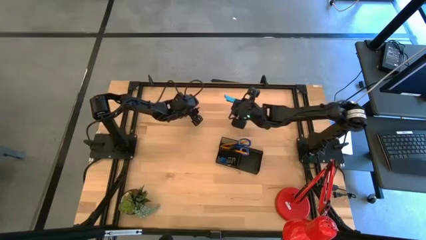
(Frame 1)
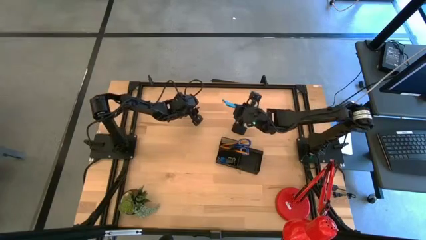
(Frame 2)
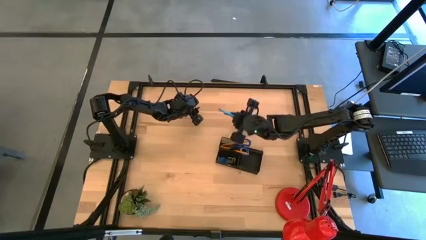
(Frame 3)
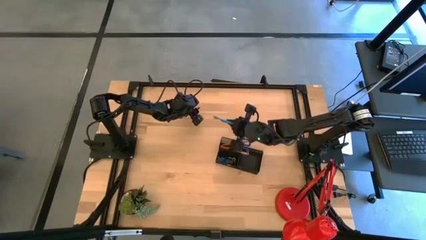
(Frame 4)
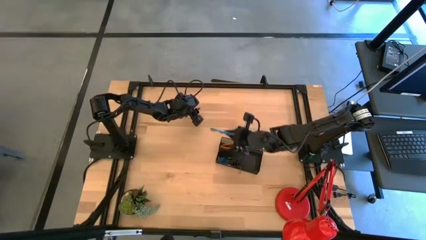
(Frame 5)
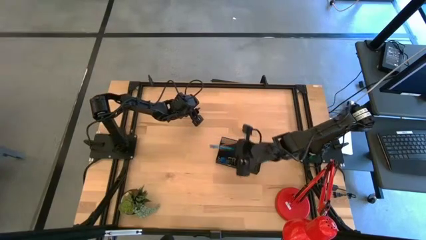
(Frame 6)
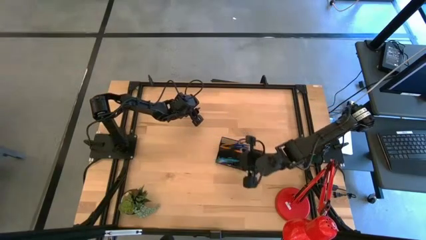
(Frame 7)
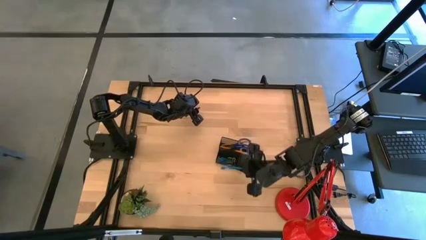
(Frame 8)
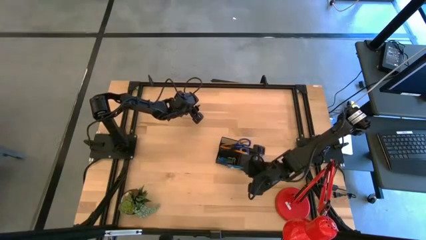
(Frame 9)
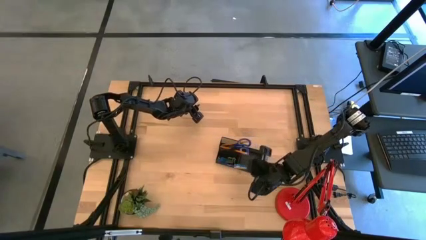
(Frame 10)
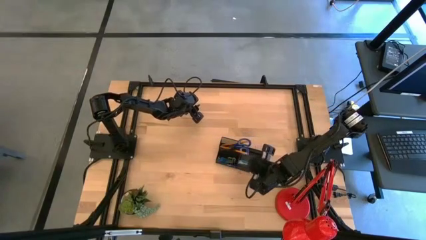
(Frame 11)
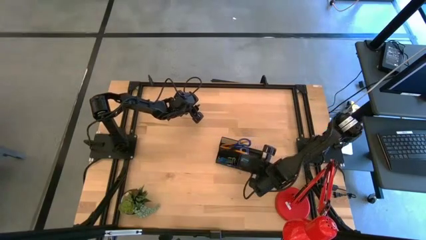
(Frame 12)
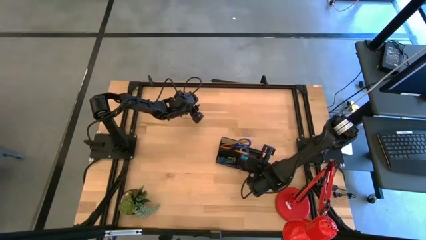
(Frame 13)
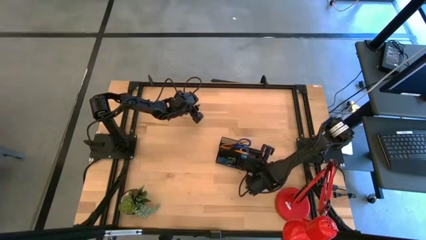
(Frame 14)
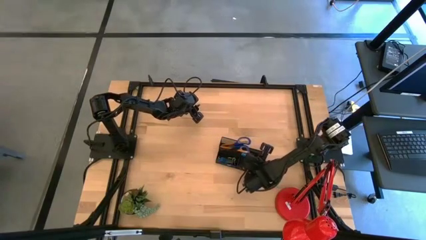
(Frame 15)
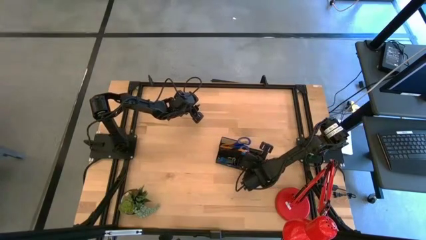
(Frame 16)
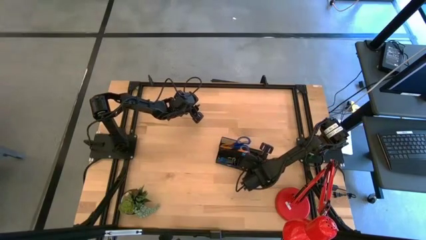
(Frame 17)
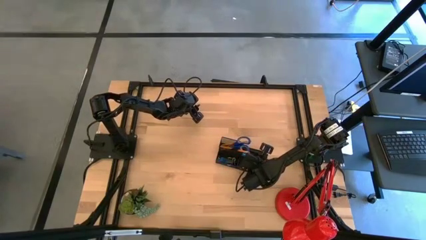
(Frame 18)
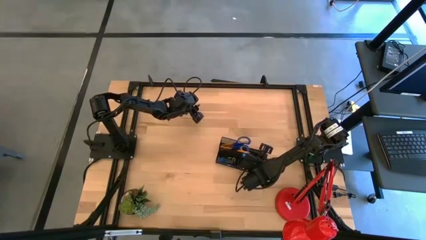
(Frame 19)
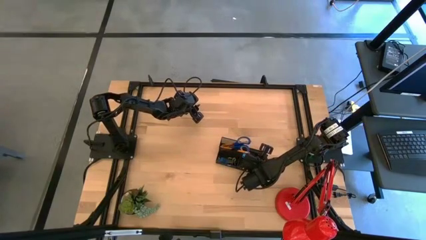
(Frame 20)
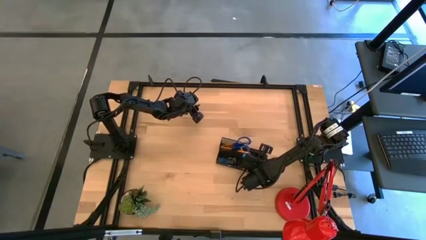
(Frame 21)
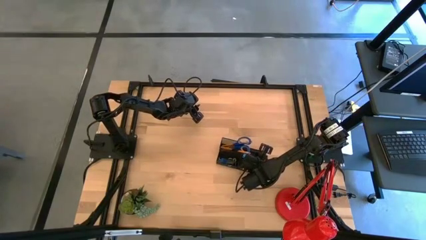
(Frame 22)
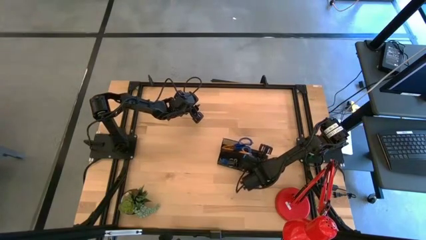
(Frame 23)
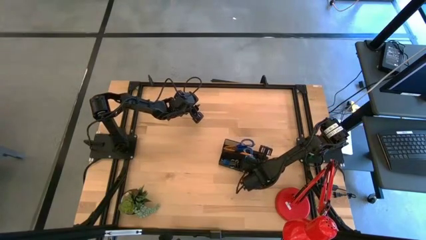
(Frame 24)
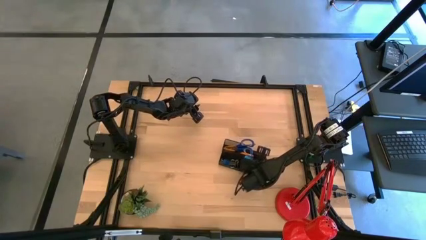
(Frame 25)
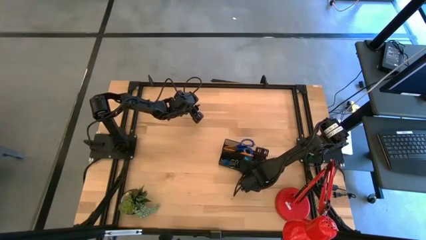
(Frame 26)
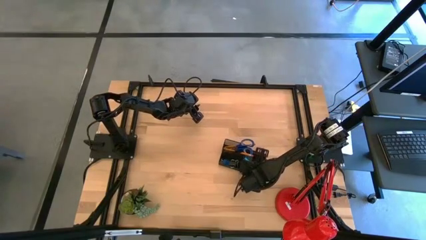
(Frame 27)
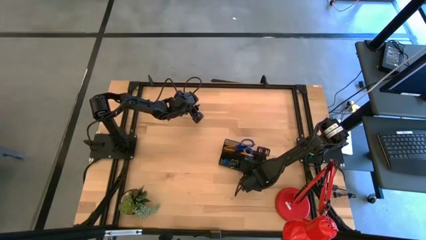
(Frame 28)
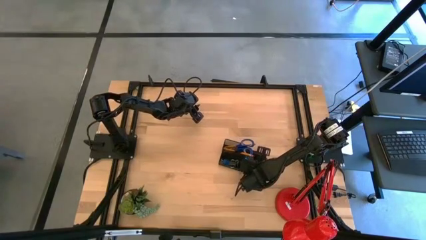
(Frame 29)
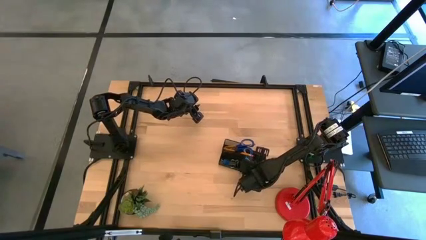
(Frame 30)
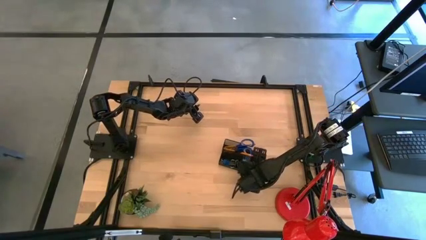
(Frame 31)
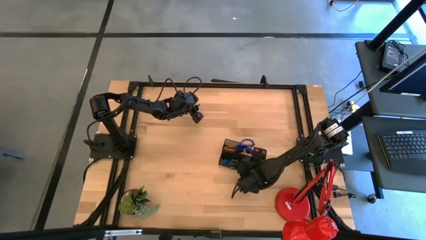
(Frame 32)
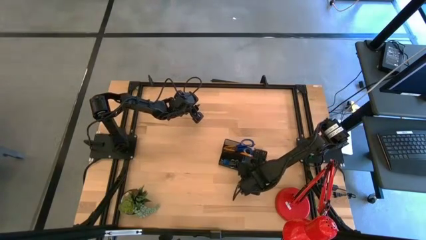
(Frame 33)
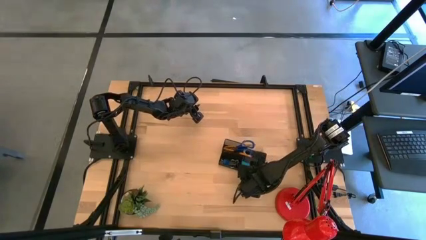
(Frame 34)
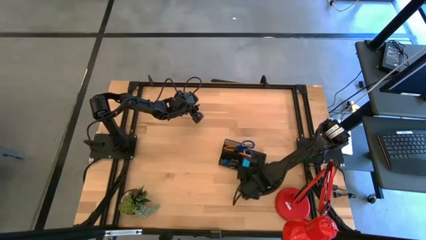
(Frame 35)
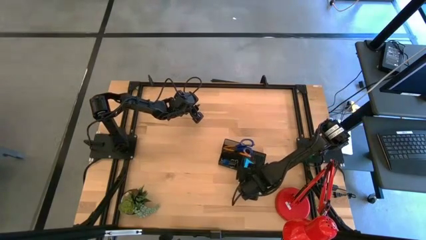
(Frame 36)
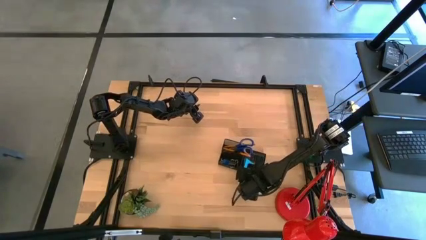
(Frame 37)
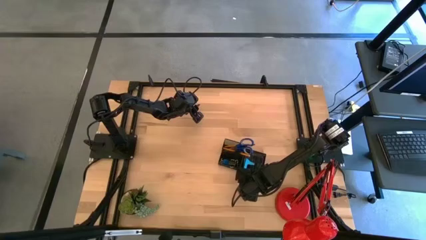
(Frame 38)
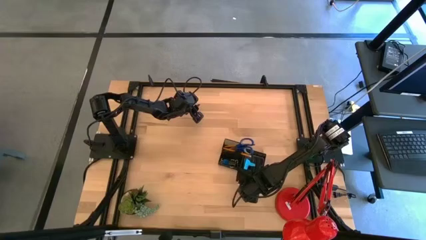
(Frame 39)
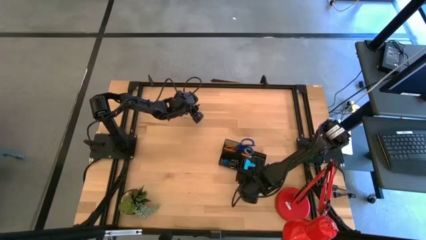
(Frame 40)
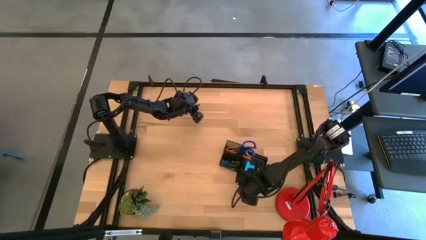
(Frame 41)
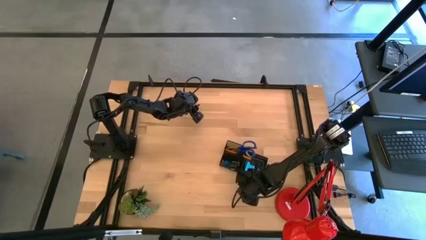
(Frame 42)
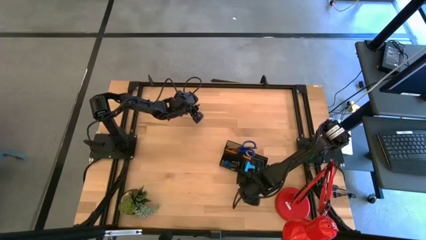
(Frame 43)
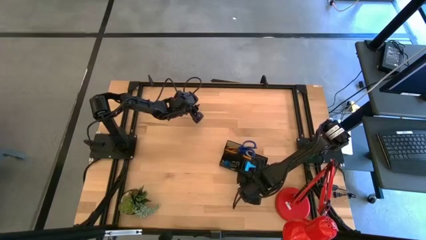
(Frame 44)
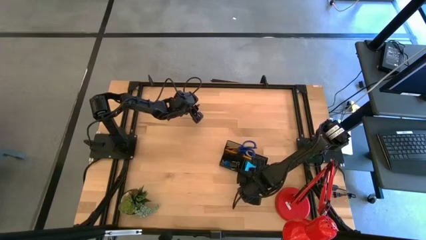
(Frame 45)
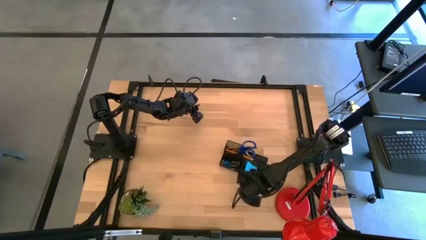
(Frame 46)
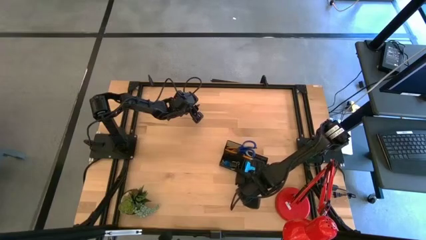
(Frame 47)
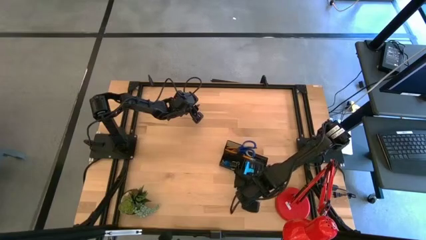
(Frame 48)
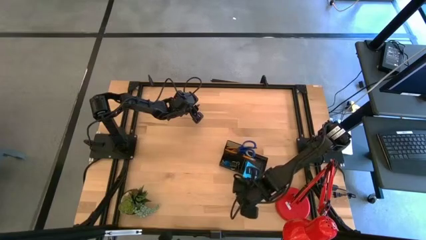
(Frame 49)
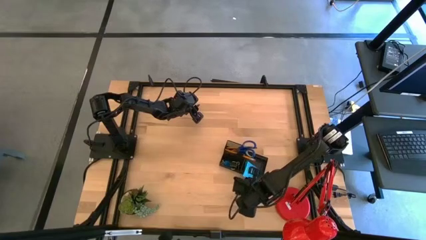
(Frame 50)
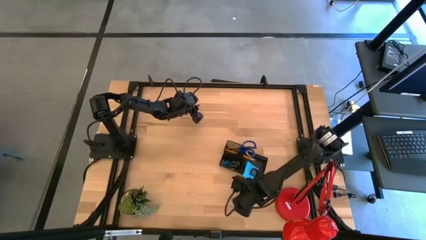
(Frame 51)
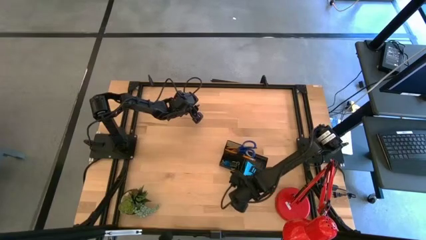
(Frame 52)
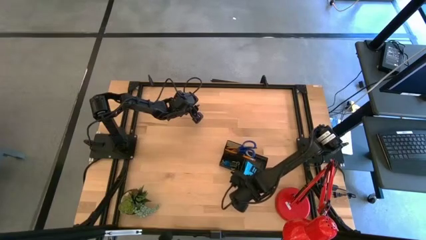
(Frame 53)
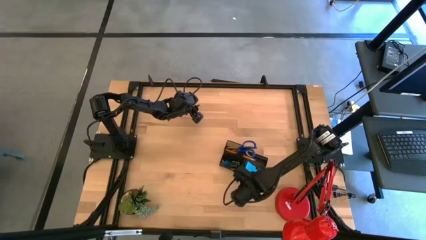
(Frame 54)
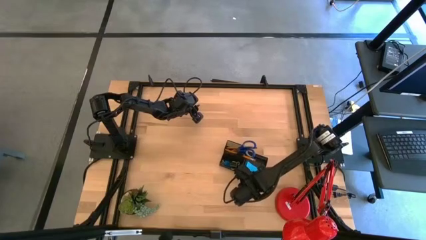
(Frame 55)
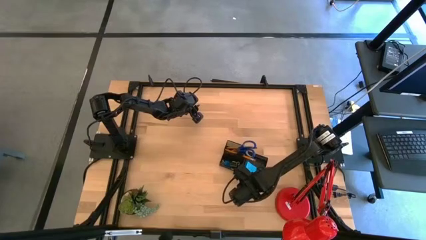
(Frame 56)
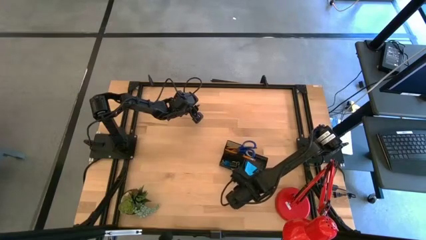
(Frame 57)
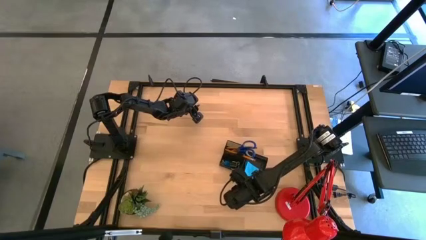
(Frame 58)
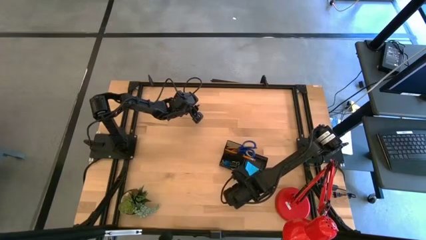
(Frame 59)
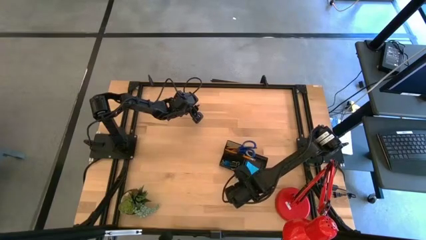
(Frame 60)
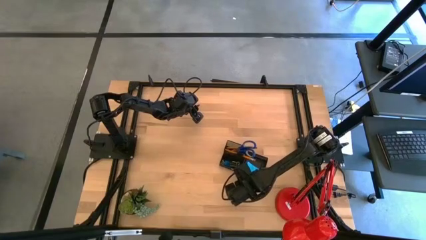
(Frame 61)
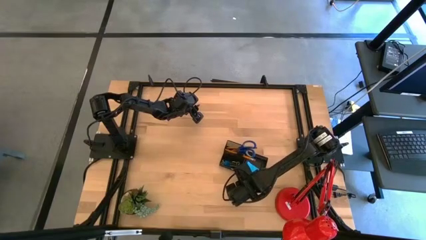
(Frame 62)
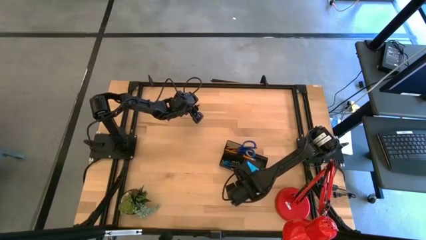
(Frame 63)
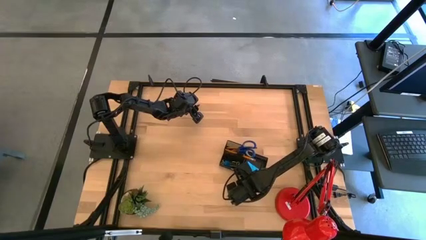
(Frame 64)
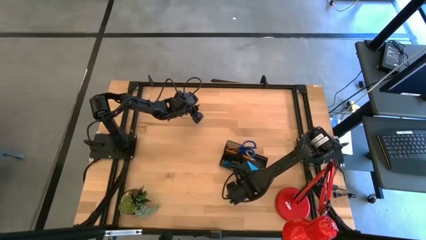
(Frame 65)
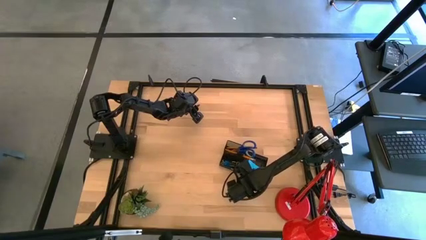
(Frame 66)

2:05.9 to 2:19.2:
Task: Pick and place office supplies into organizer
Put the blue sticky note pad into the black desk organizer

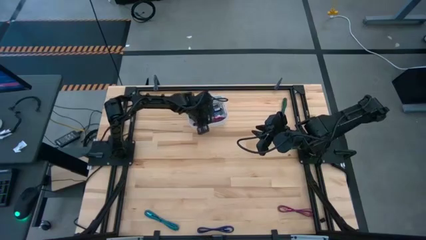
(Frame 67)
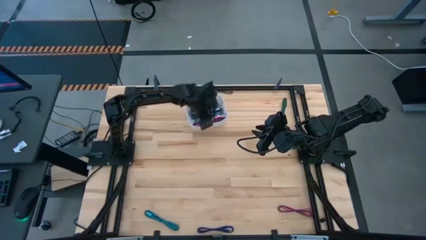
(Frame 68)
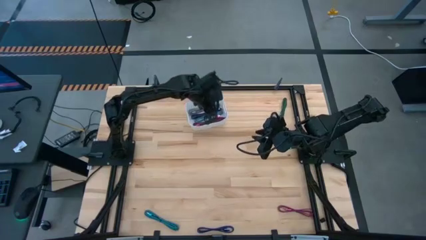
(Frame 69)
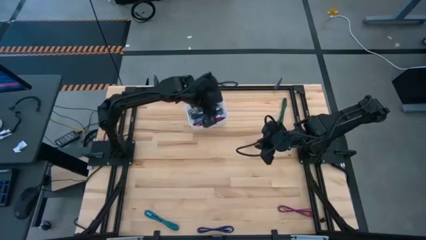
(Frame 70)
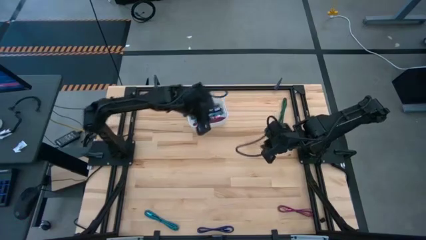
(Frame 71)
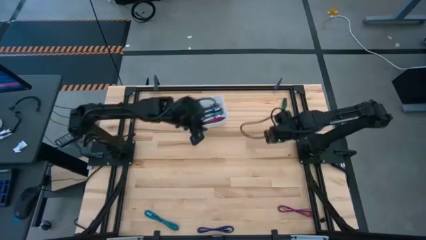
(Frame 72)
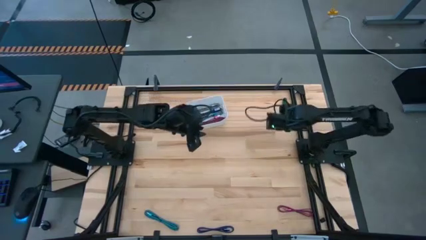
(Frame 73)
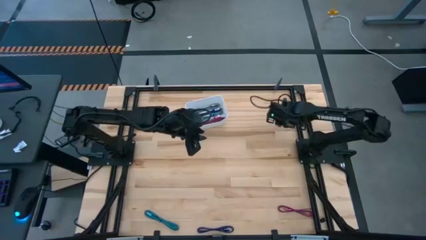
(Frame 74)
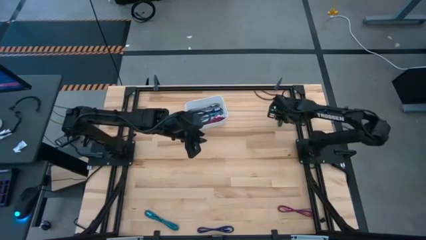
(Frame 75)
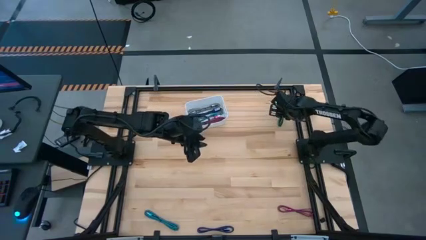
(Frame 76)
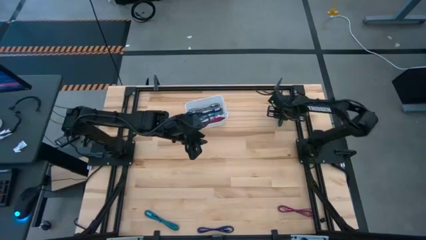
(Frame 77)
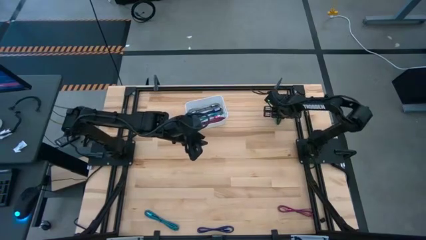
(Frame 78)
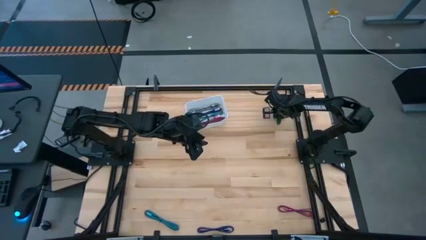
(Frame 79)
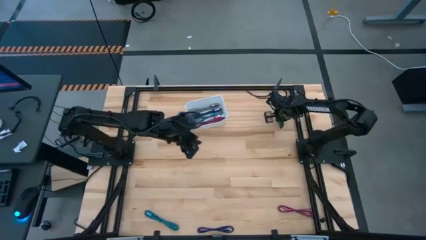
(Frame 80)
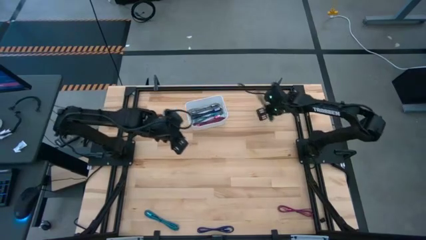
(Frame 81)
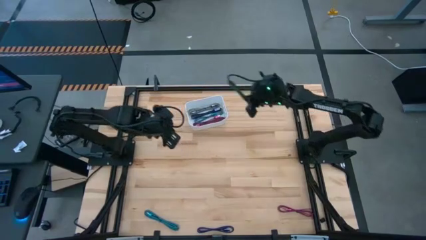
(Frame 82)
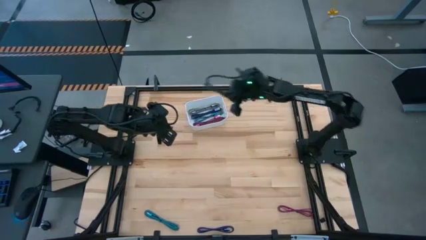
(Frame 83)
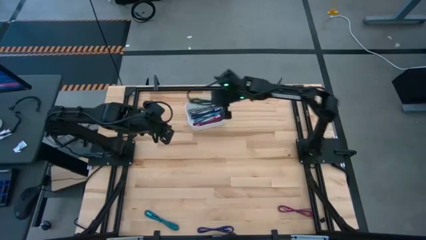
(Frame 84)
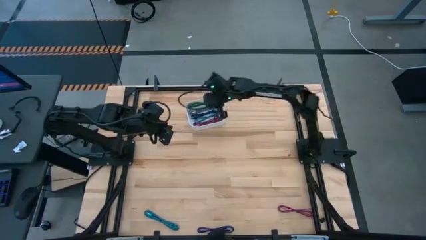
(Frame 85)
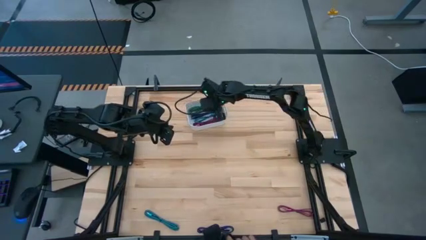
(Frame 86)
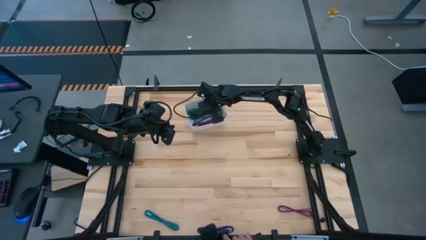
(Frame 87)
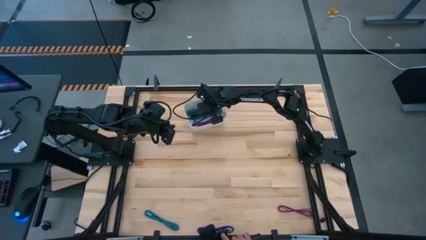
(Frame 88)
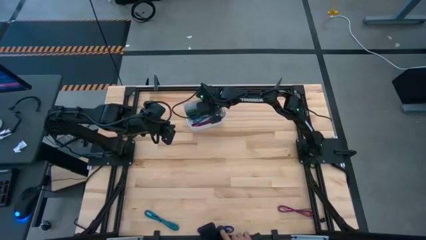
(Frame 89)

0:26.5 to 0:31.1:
Task: Pick and place USB-C Cables
Put the black green charger cable into the white bin
